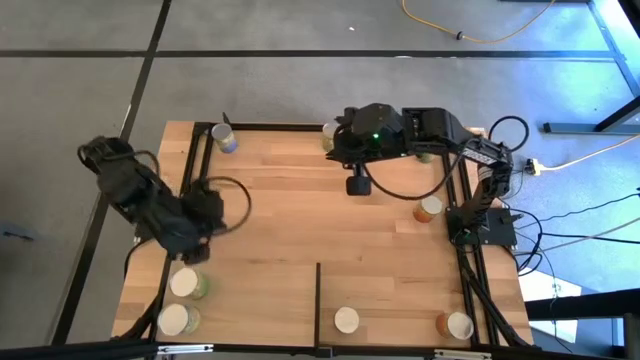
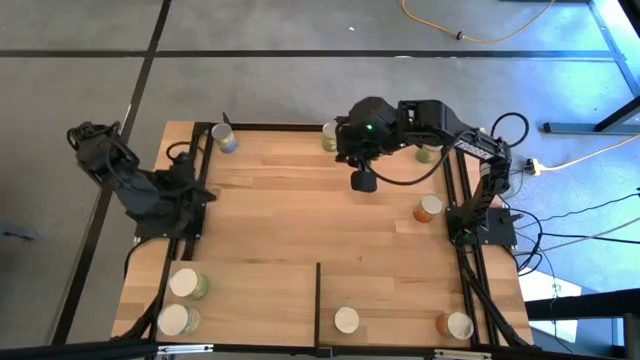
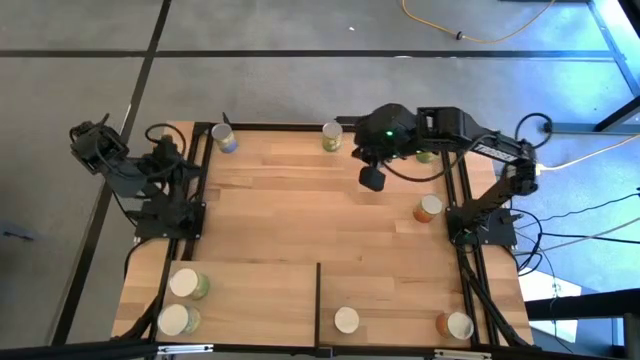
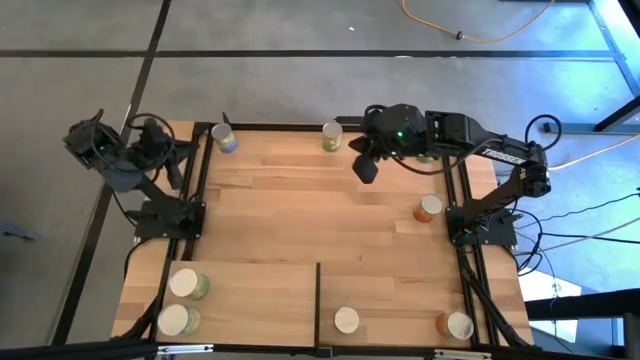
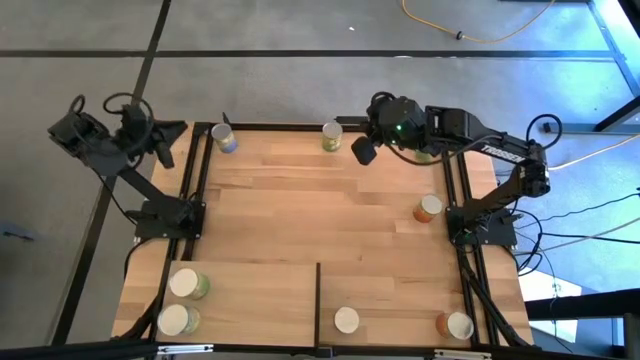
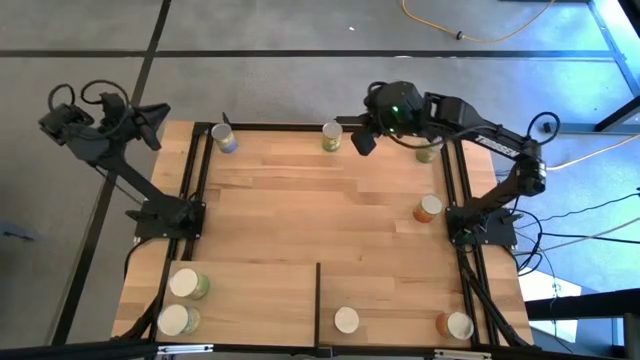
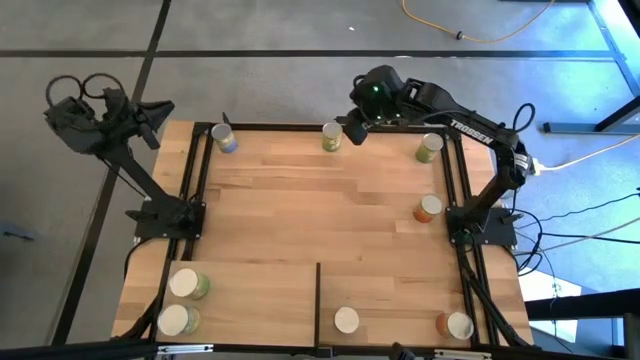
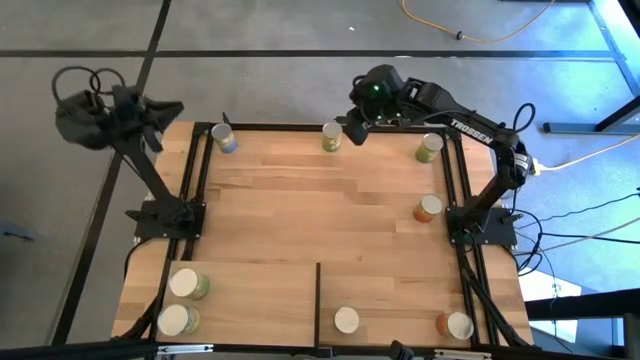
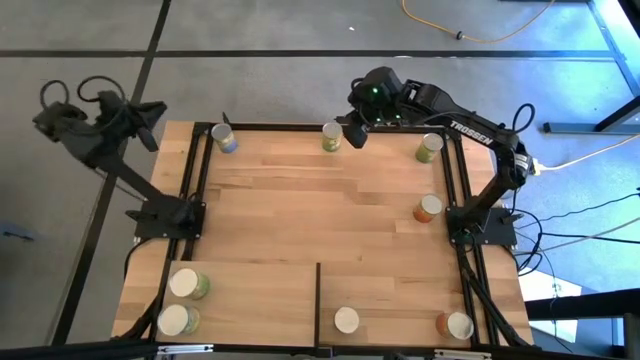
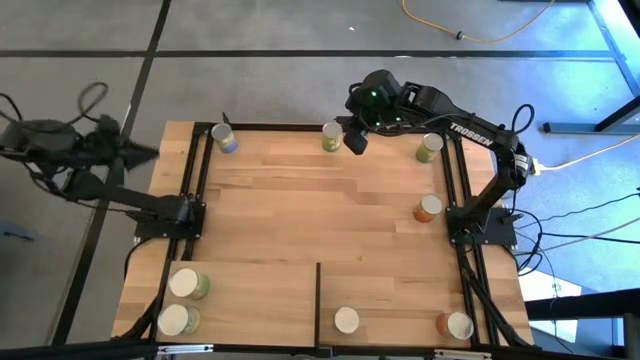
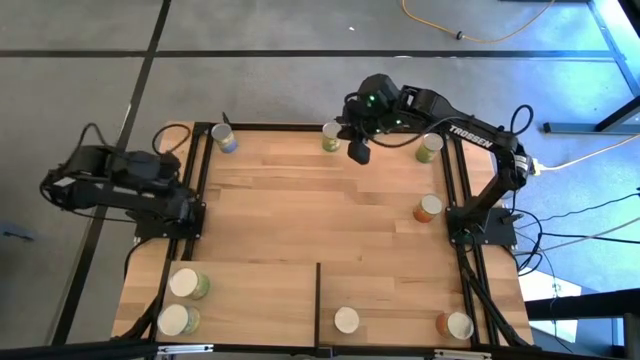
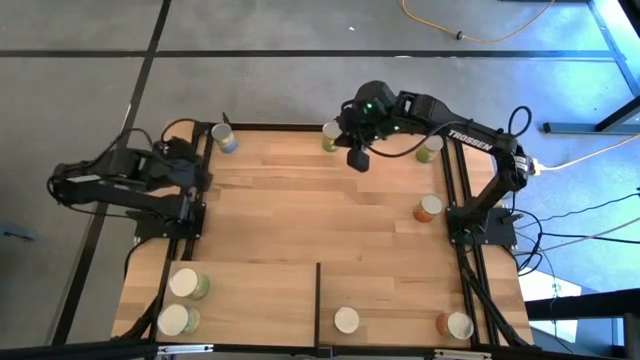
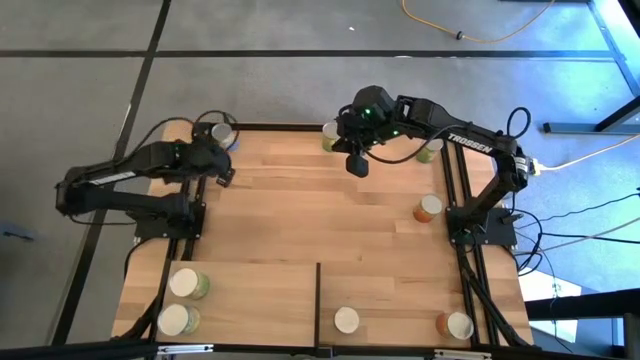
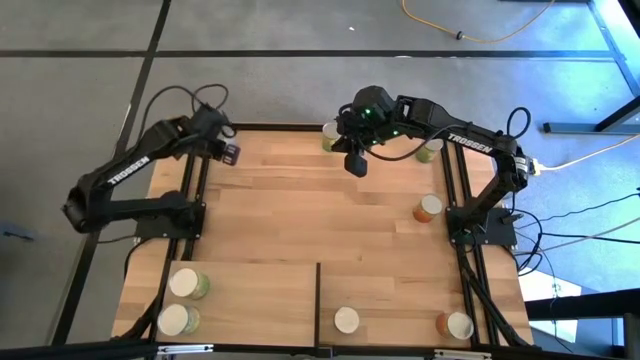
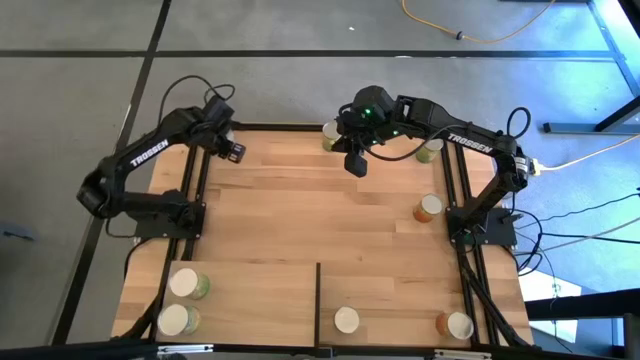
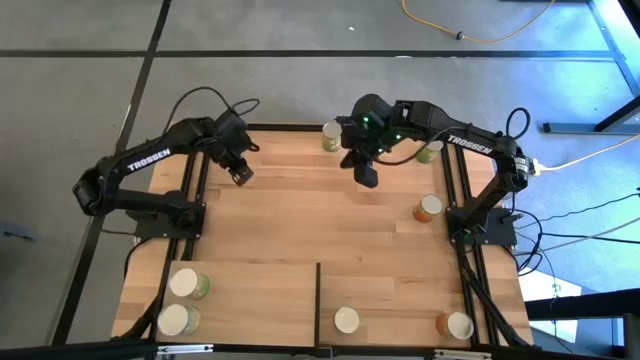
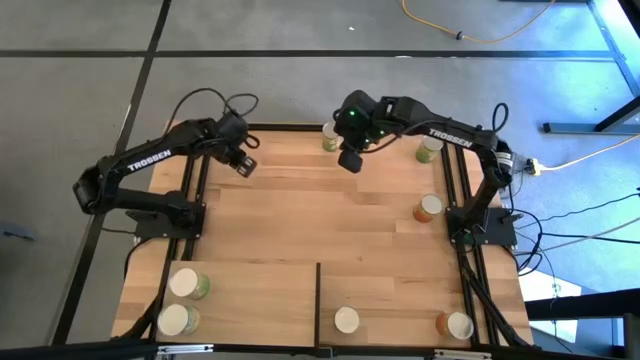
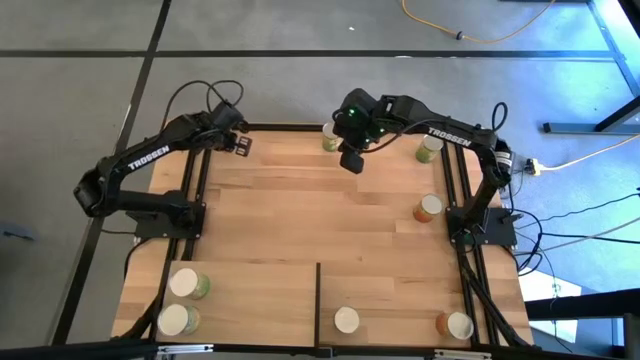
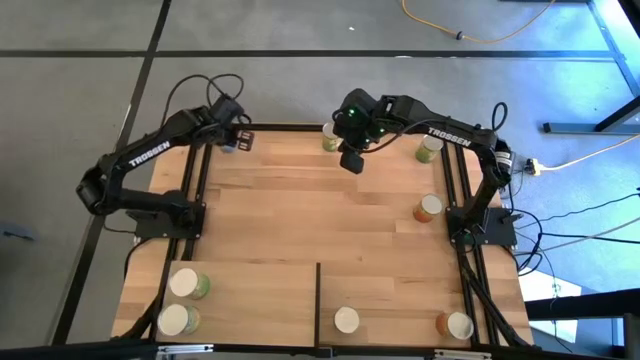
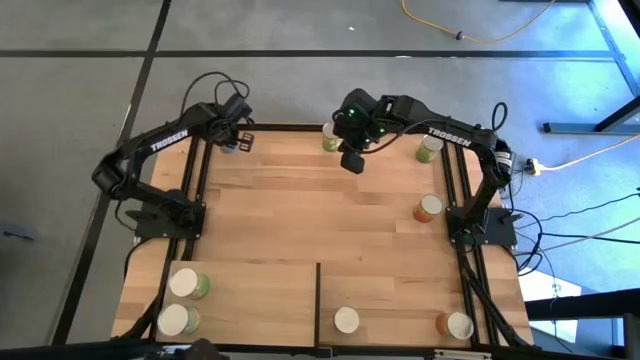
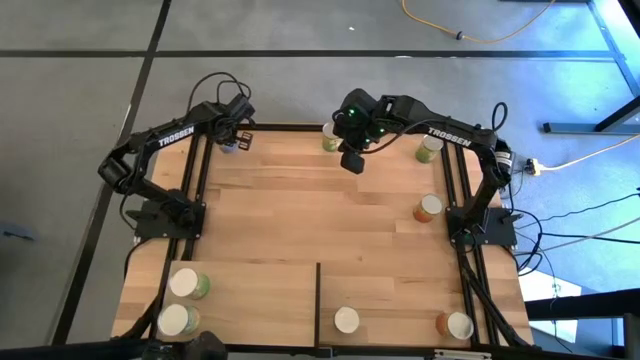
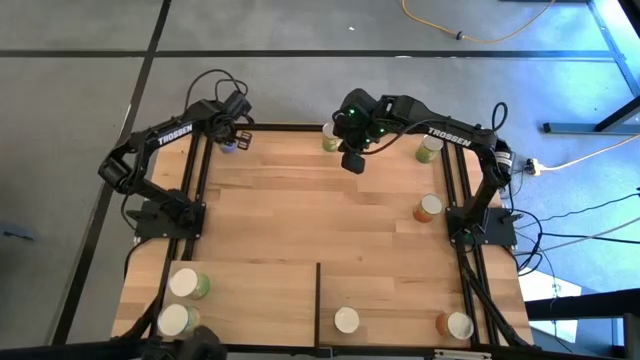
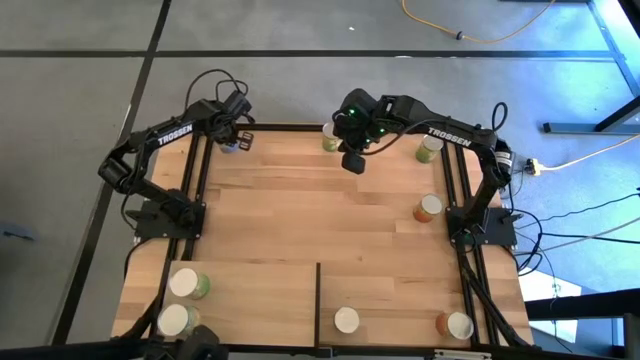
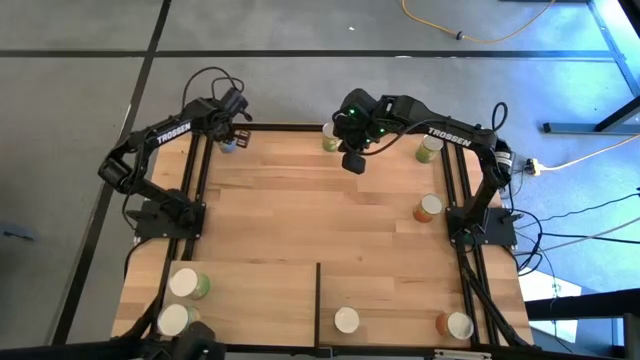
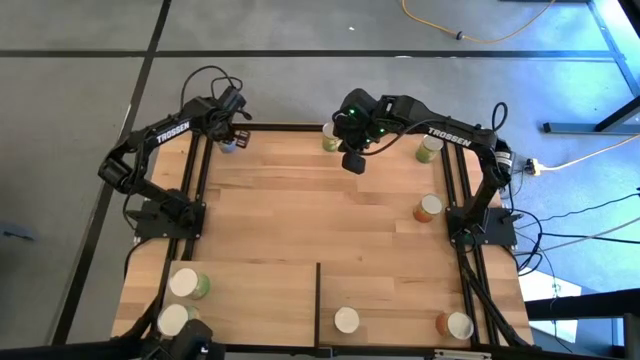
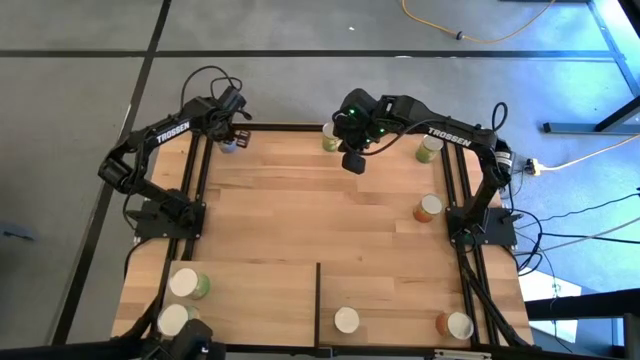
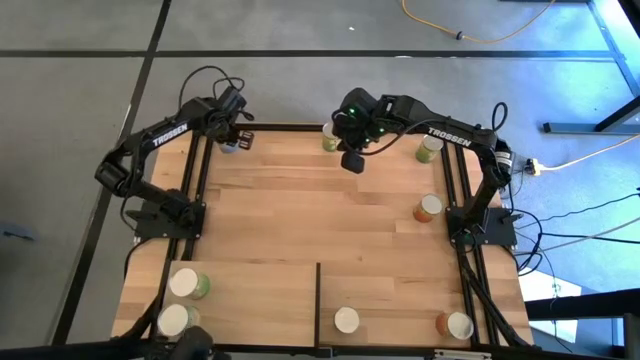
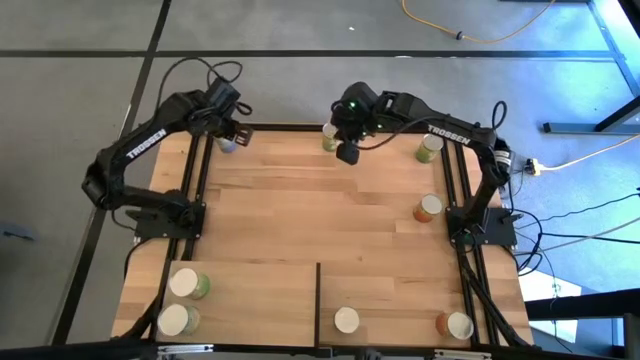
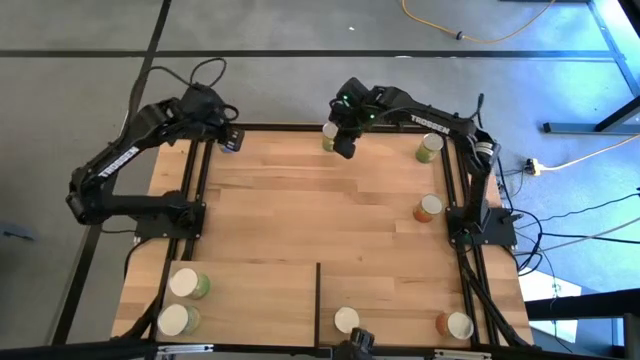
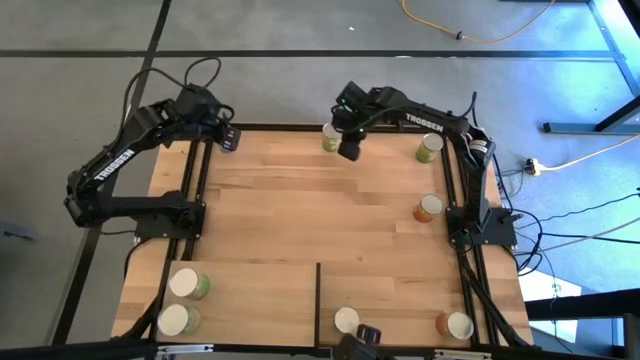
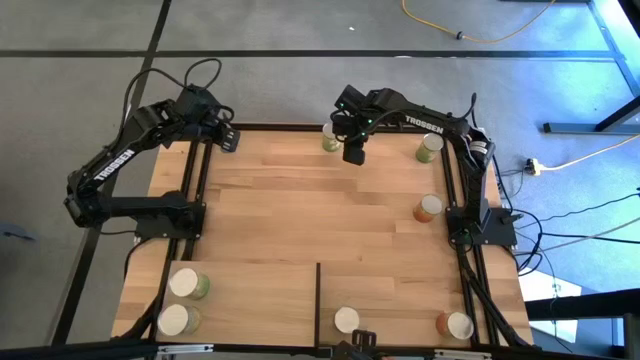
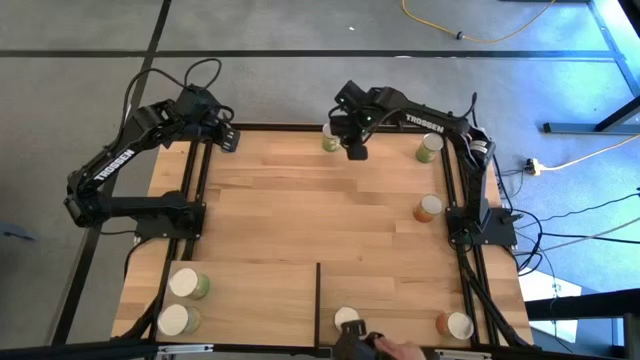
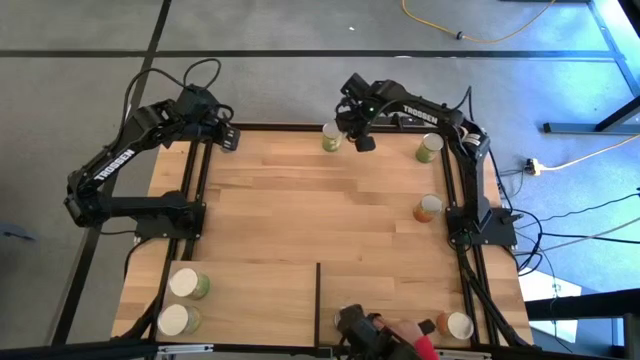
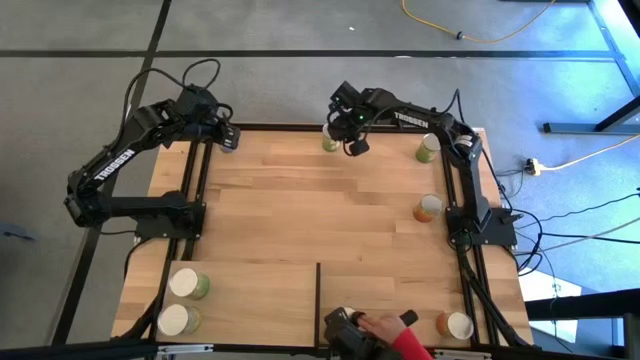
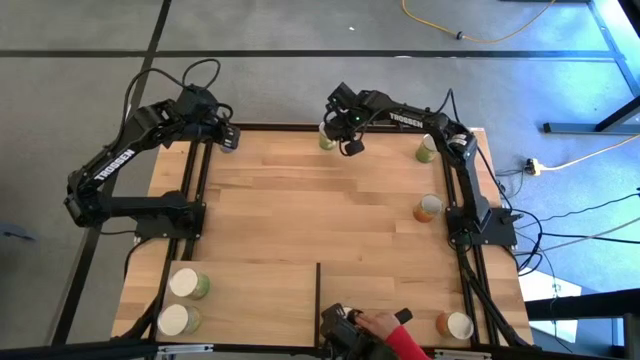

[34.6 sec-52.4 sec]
Task: Pick and place cans onto a shelf
Put the canned peaches on the shelf

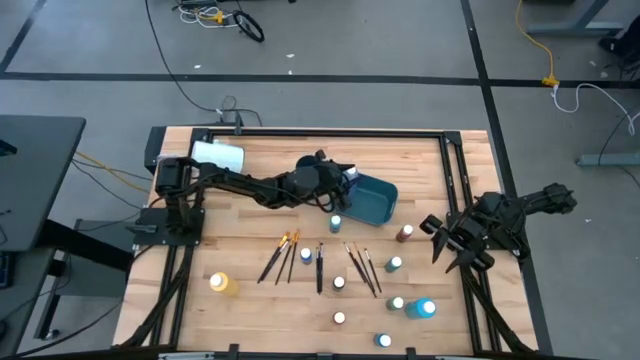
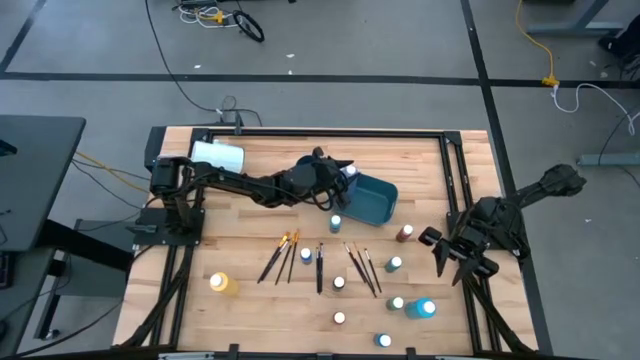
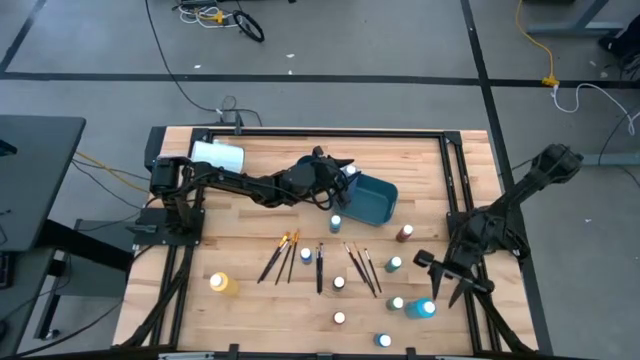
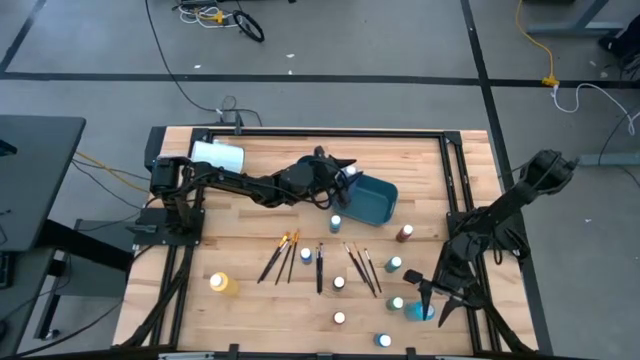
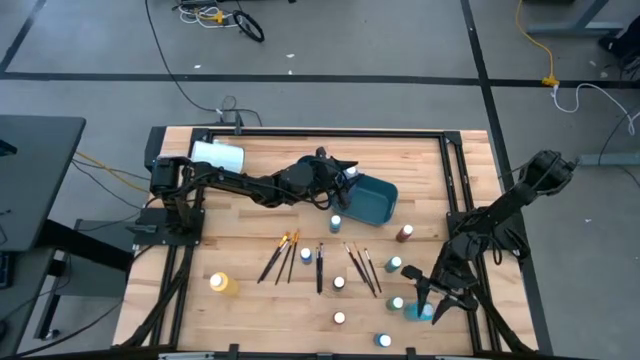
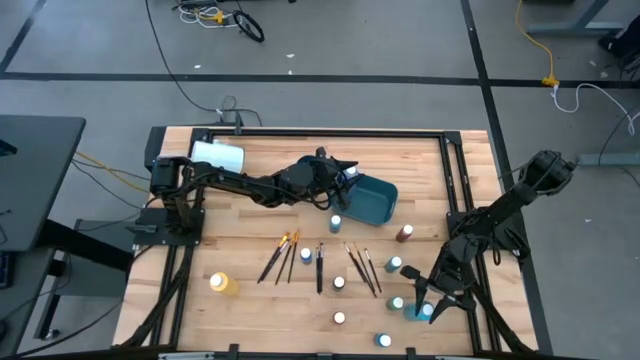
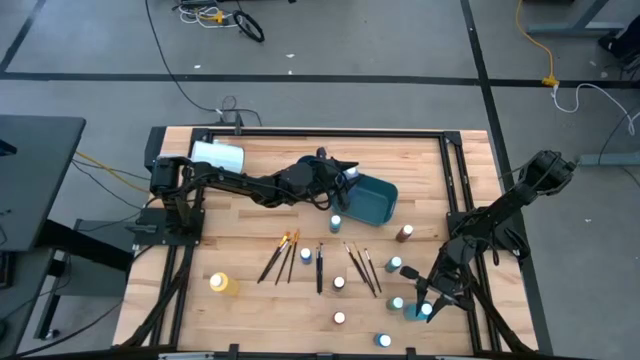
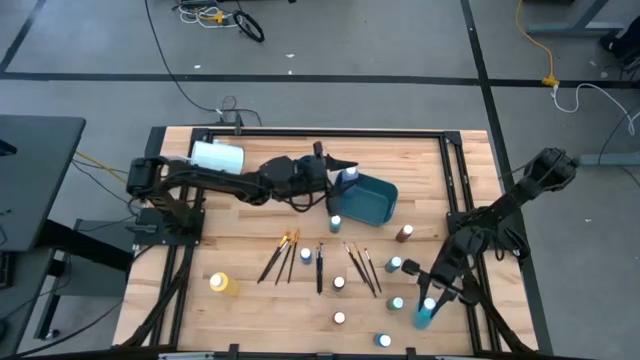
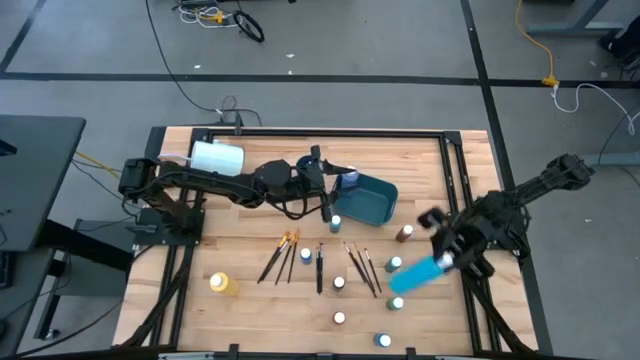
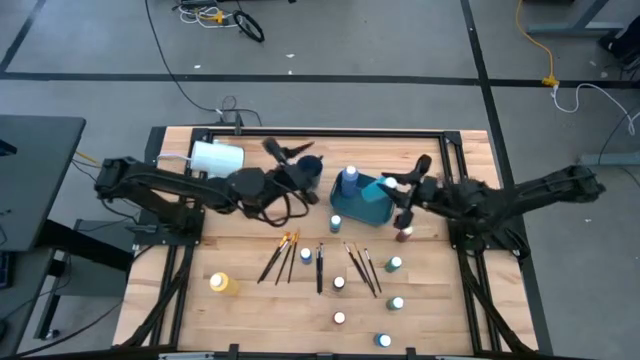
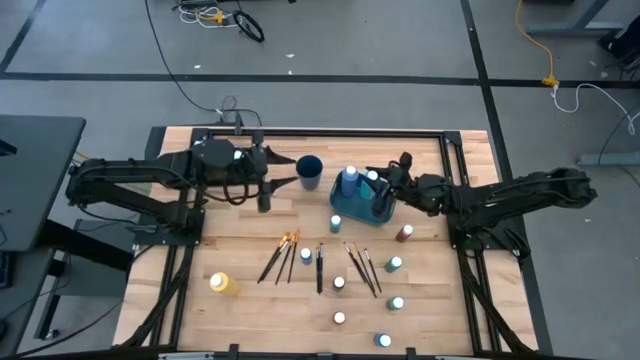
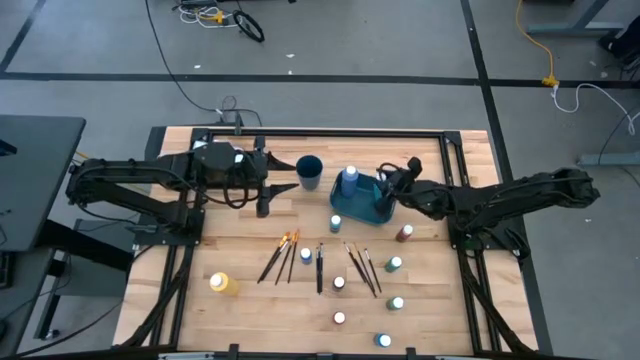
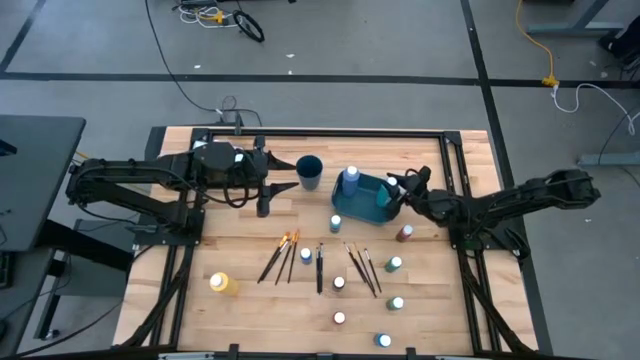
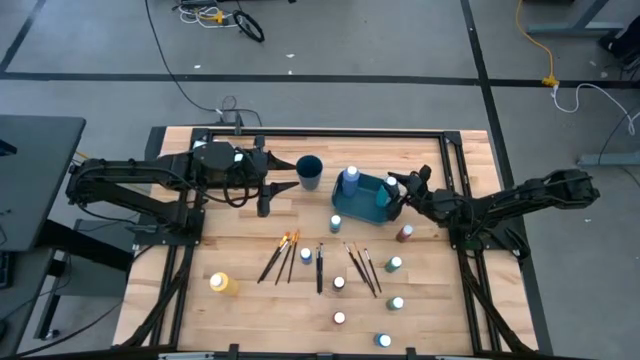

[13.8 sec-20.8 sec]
Task: Pick & Place Paint Supplies
Put the large light blue paint bottle into the blue bin
